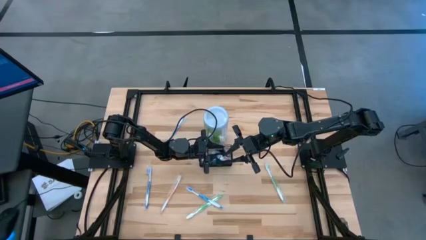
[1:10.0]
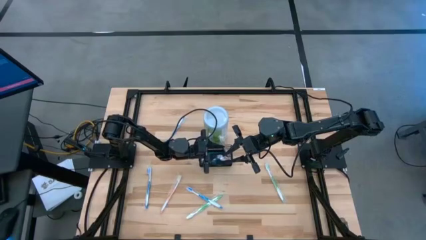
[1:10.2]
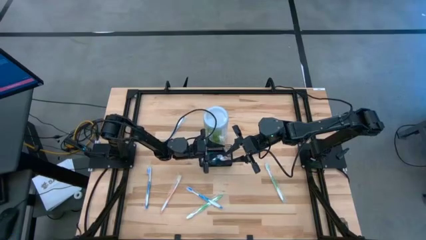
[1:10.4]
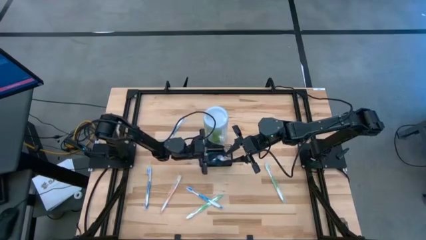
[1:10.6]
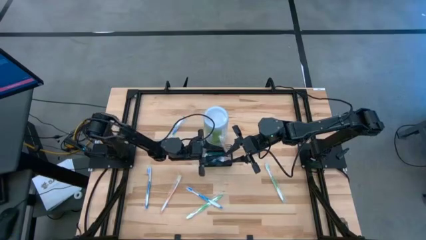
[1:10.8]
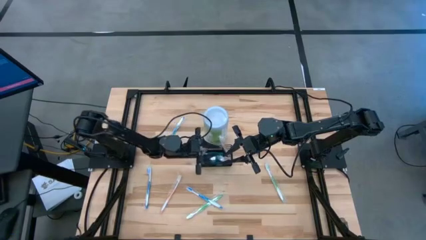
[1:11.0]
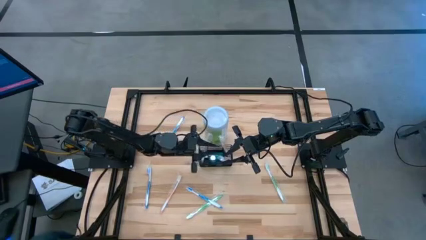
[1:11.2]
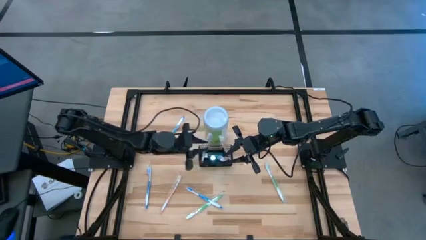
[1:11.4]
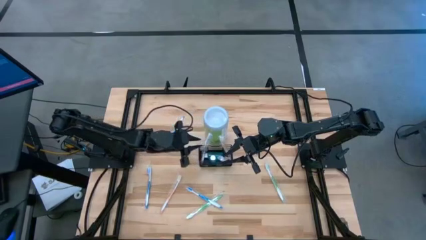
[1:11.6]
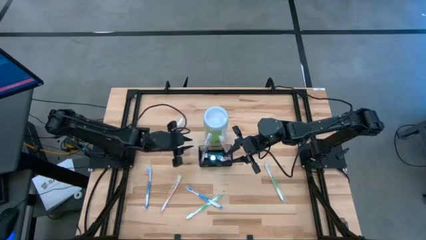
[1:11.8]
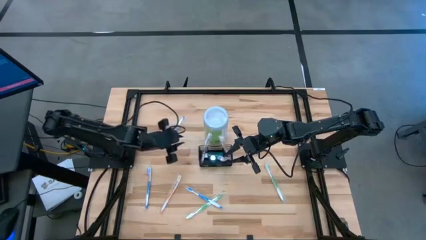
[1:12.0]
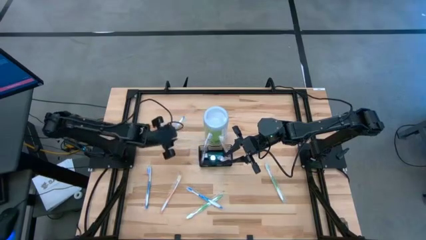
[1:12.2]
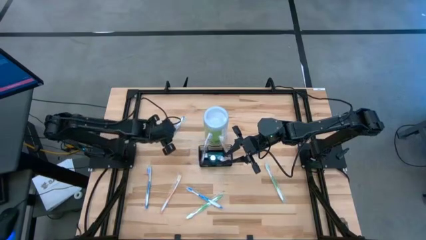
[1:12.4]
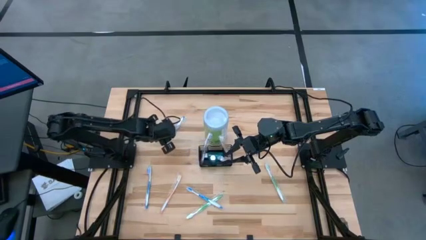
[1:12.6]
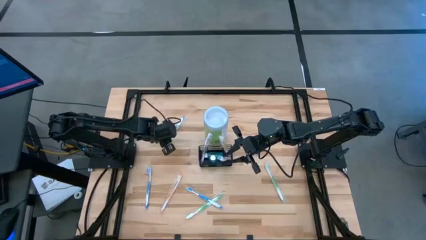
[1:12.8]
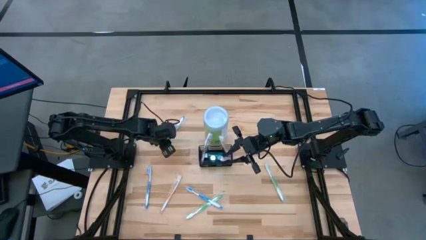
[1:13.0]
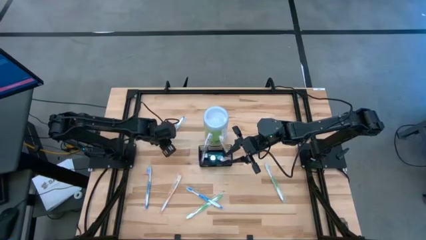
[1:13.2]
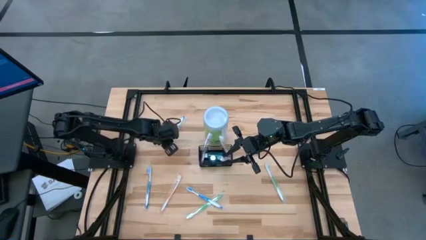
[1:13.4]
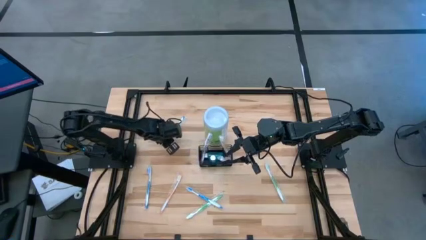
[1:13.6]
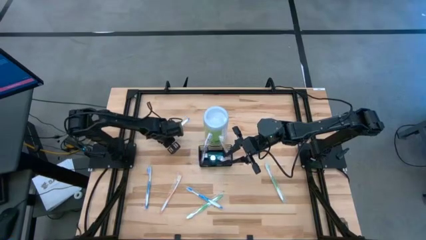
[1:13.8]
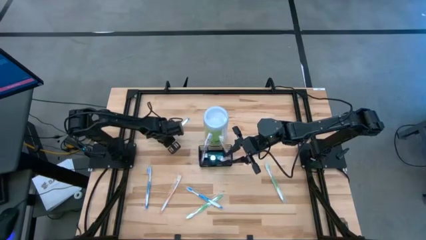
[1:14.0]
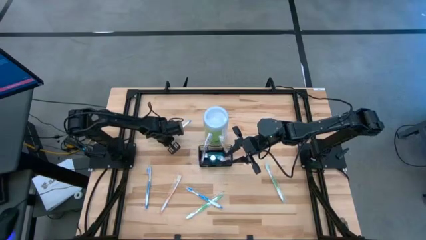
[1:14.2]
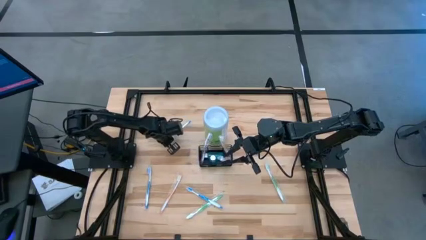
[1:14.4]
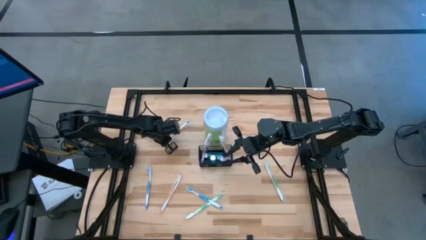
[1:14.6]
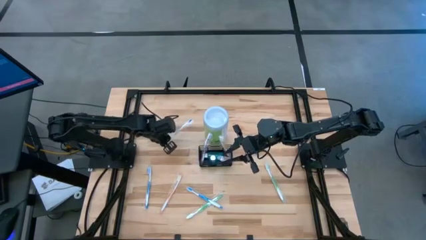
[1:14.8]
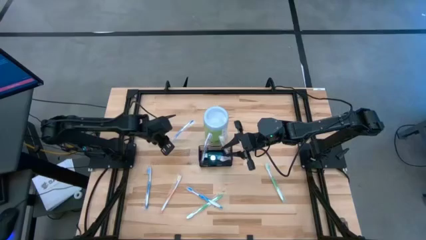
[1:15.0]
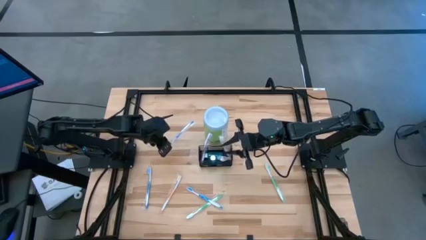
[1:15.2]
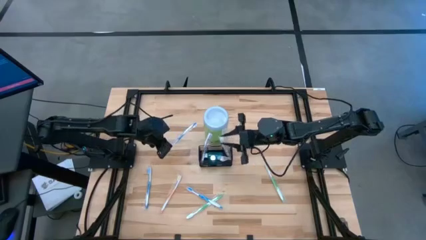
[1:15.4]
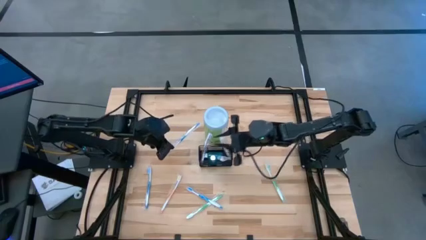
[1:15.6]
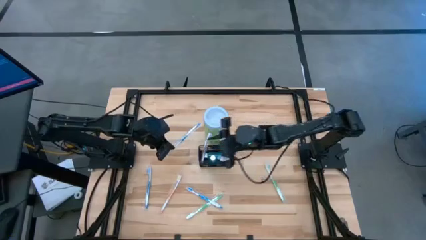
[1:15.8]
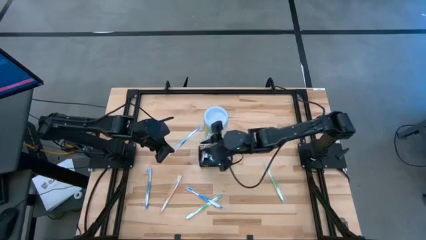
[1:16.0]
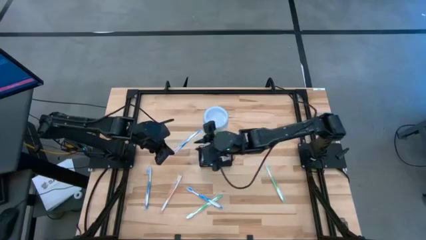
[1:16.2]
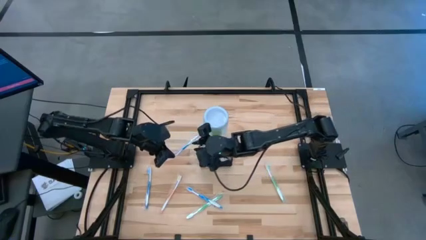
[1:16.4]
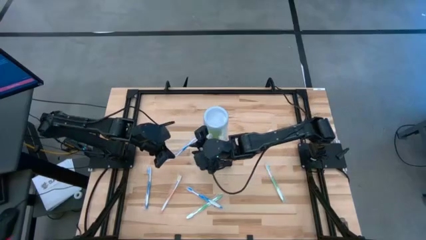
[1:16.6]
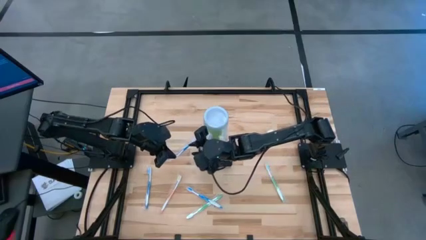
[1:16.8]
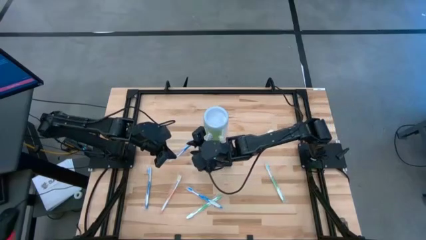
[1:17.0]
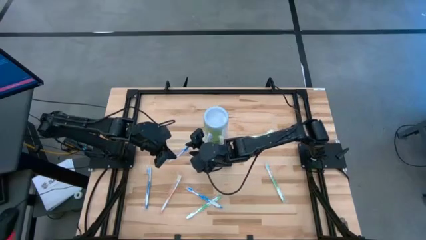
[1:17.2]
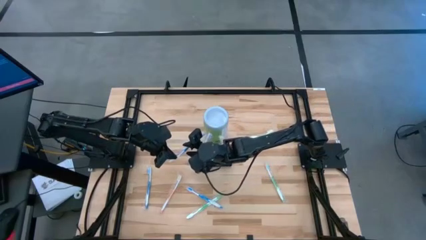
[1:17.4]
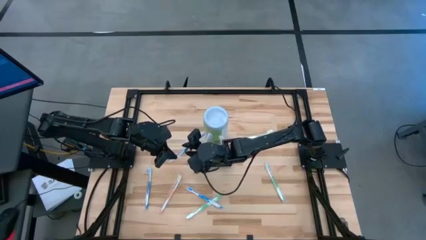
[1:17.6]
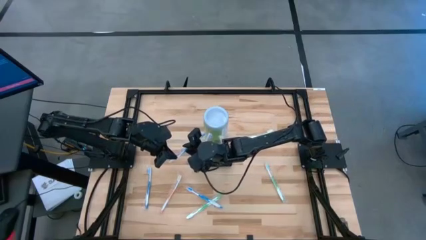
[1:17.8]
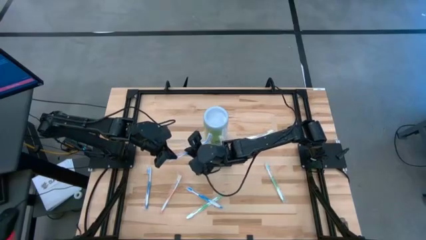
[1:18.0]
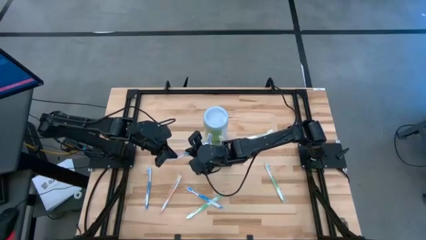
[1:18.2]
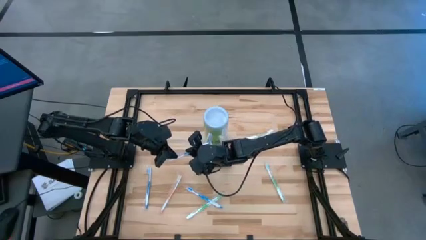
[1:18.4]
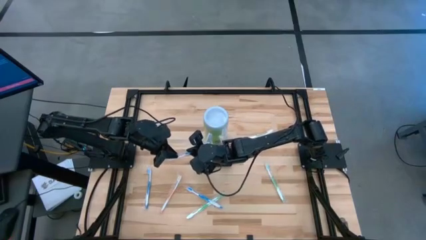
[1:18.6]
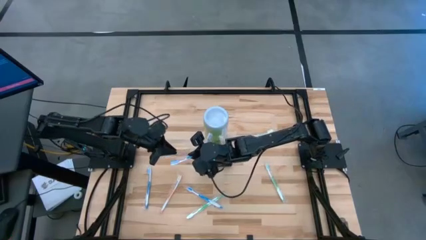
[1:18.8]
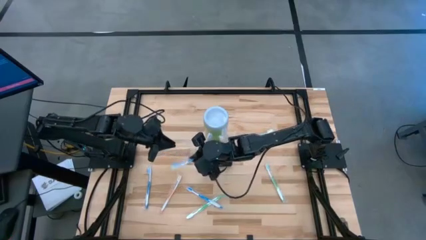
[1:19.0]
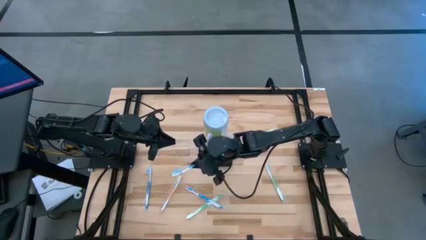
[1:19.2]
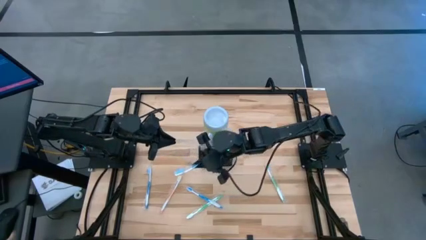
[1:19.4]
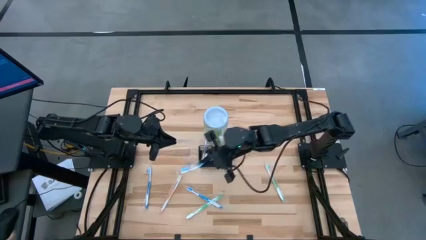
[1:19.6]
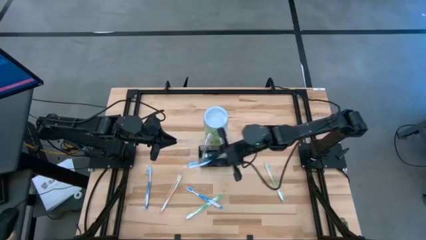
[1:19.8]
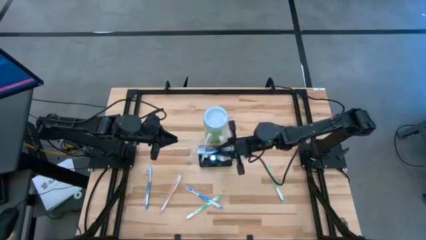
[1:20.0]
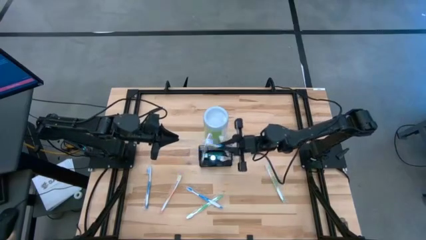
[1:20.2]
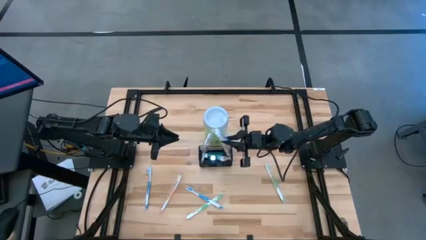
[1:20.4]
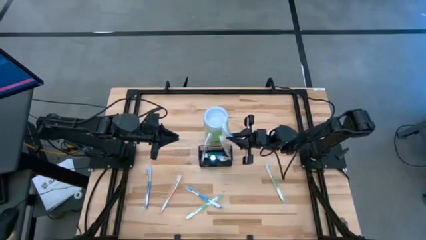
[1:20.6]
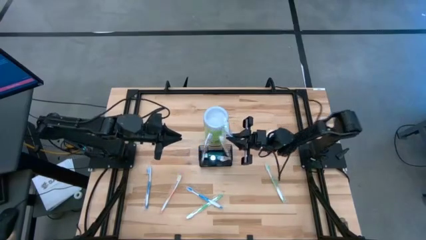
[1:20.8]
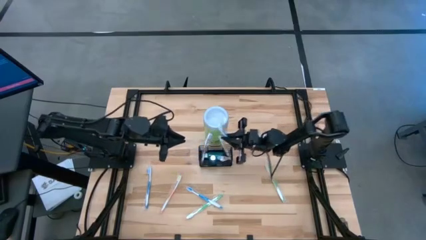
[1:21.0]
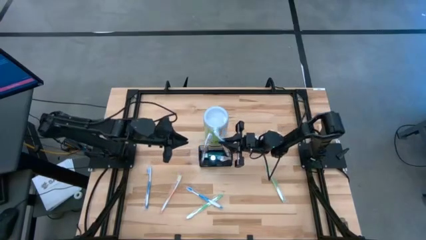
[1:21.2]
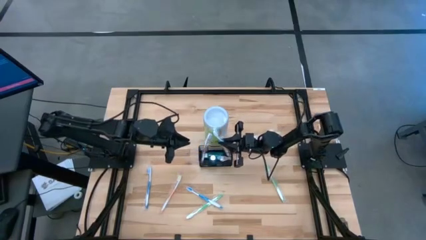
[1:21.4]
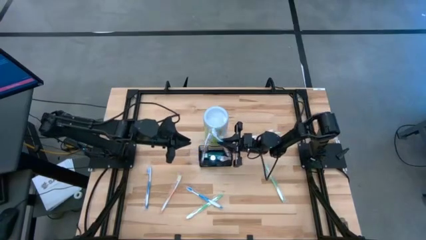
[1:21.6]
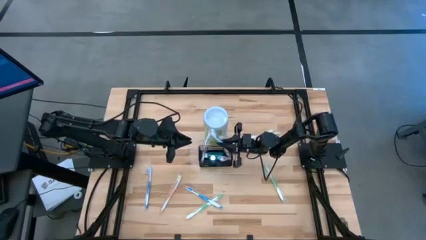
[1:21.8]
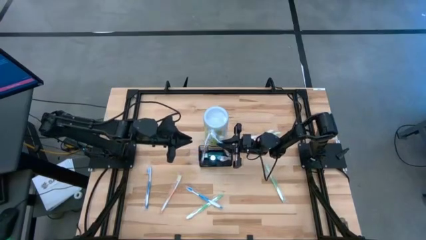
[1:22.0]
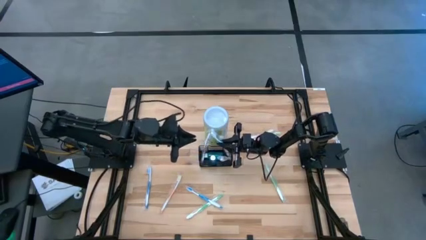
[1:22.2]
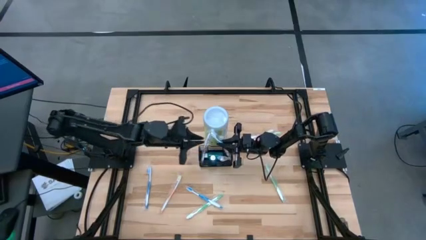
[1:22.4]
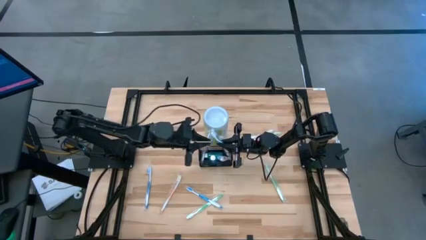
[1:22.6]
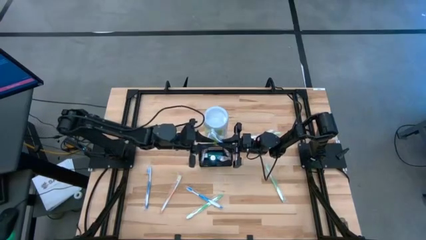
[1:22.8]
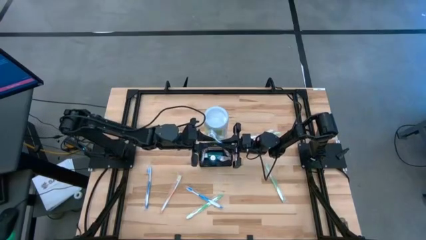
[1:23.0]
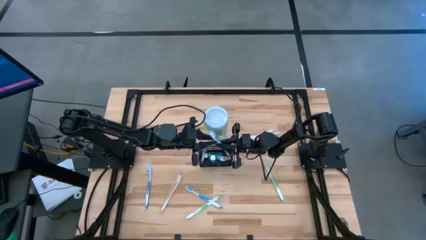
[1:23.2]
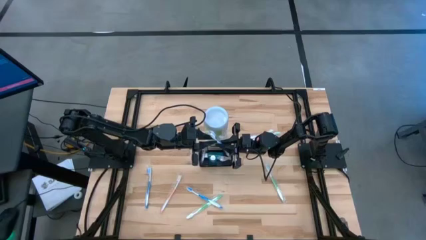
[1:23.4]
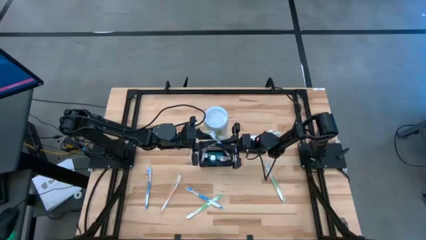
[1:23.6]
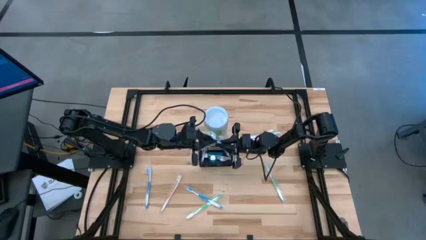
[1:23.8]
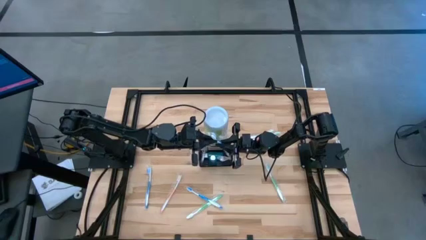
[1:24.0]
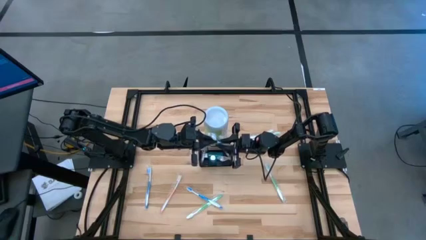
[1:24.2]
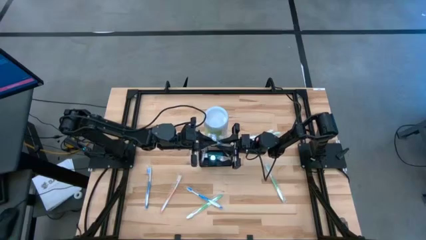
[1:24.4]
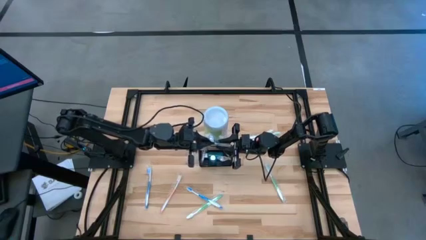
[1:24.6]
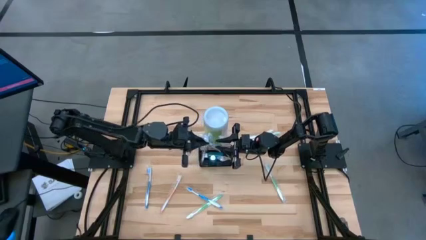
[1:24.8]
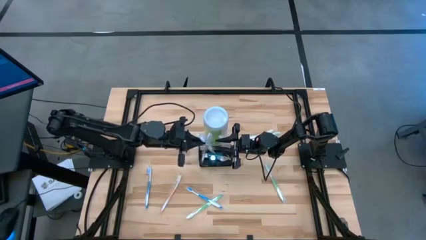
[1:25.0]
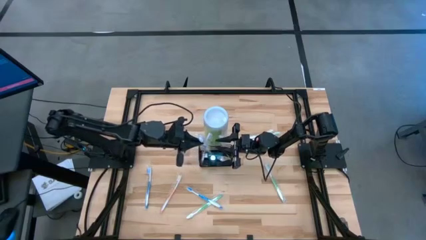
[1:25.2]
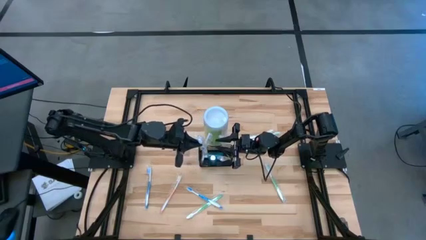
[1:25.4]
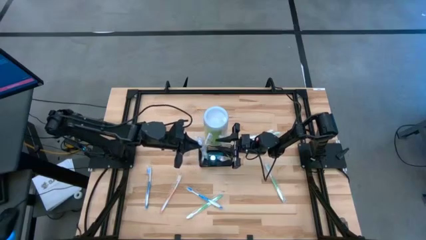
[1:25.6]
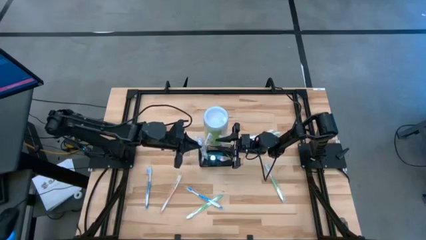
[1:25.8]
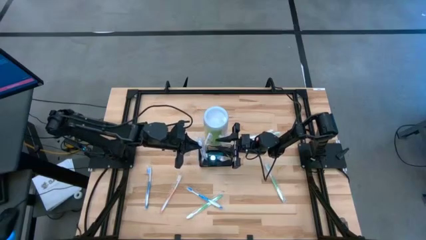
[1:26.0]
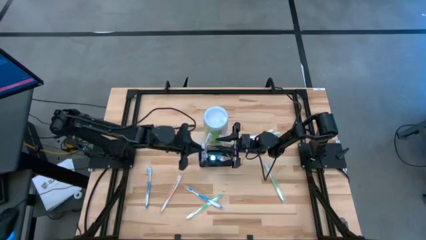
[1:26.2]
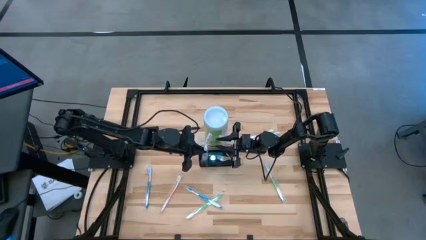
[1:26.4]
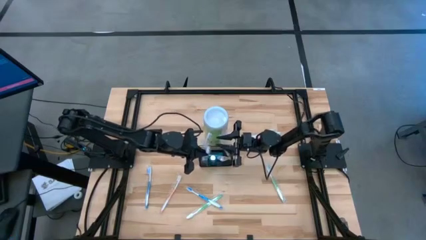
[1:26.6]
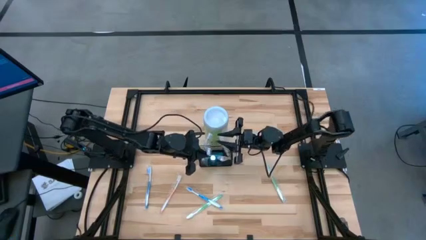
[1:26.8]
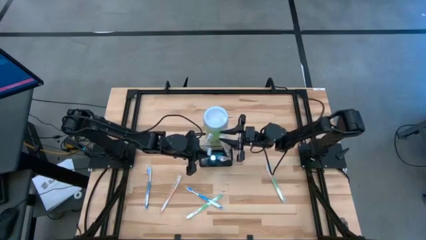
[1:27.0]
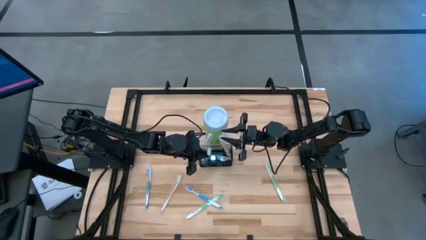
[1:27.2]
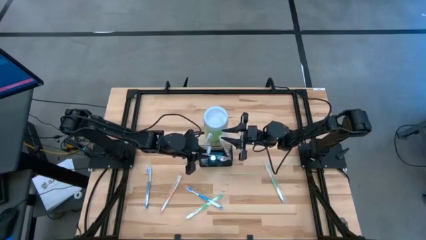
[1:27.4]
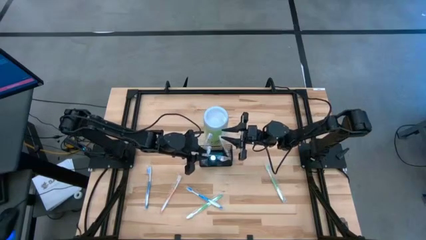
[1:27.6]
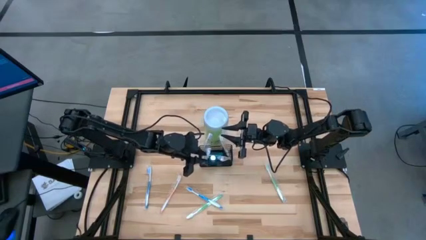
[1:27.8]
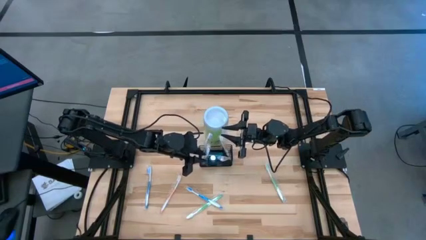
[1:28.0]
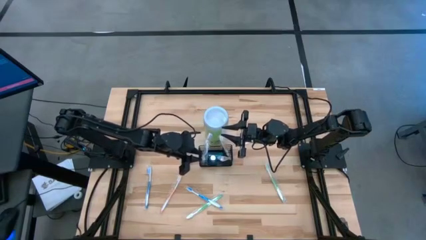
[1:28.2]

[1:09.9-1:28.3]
Task: Pick & Place toothbrushing station
Put the top left blue toothbrush into the wire organizer
